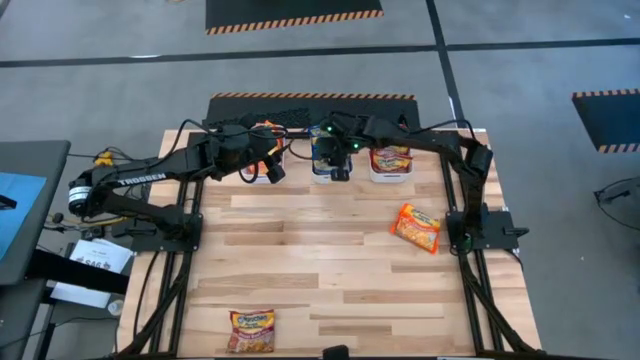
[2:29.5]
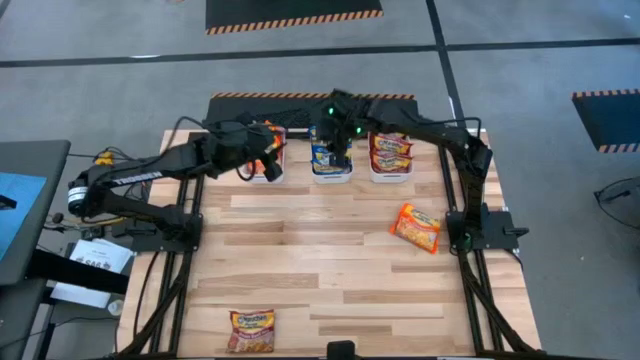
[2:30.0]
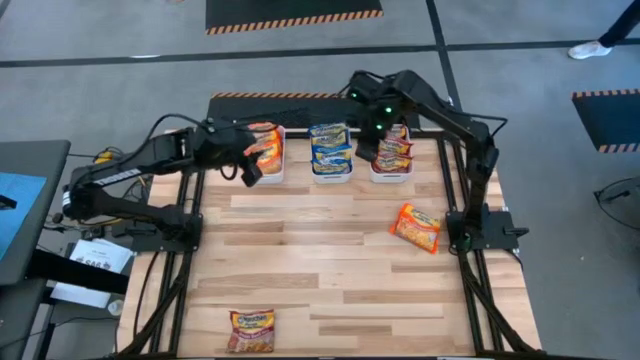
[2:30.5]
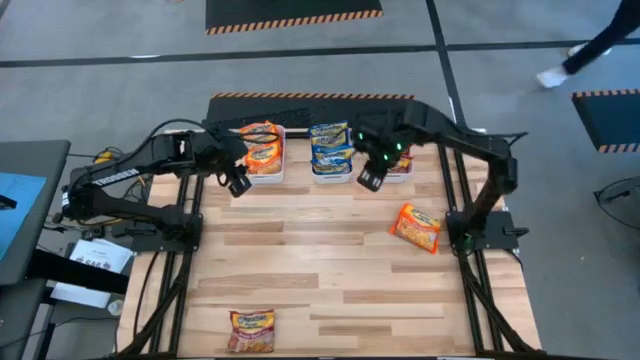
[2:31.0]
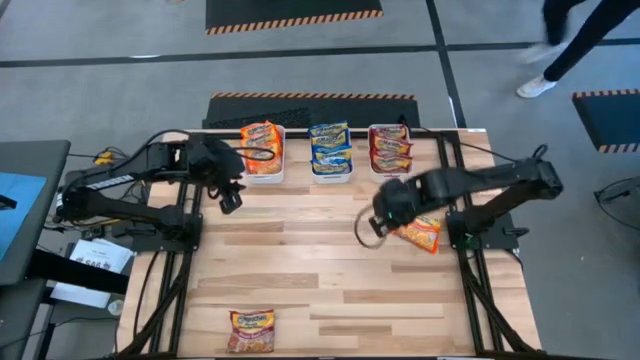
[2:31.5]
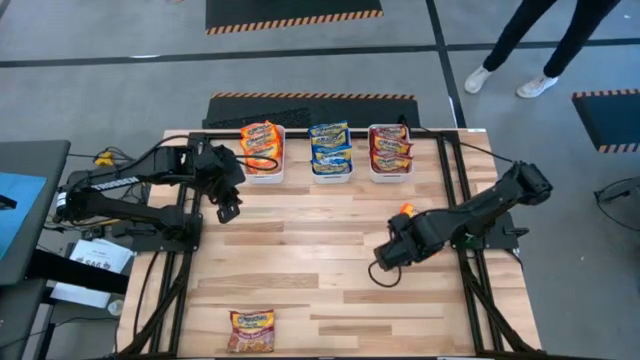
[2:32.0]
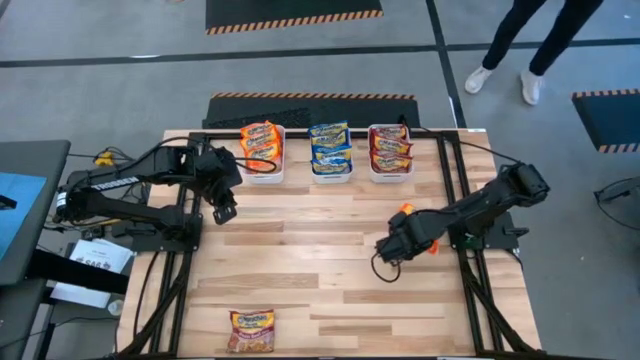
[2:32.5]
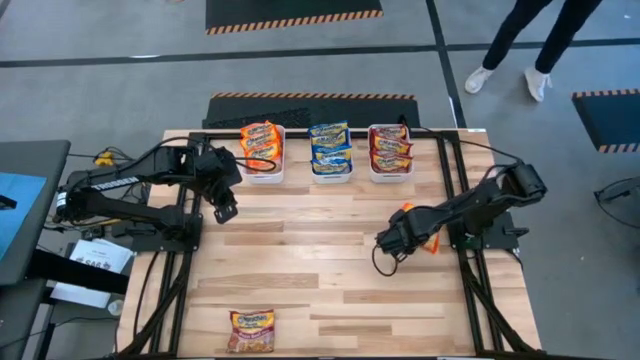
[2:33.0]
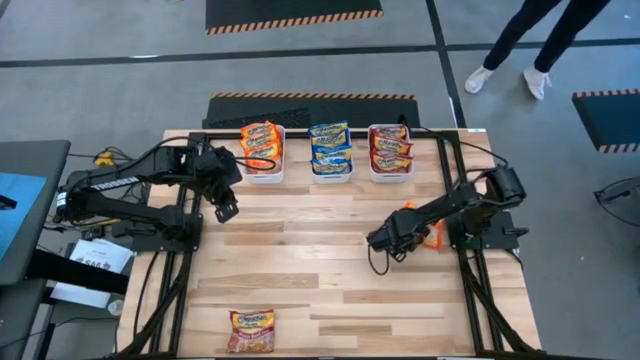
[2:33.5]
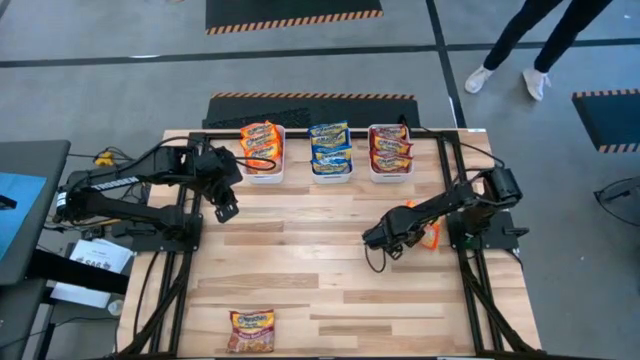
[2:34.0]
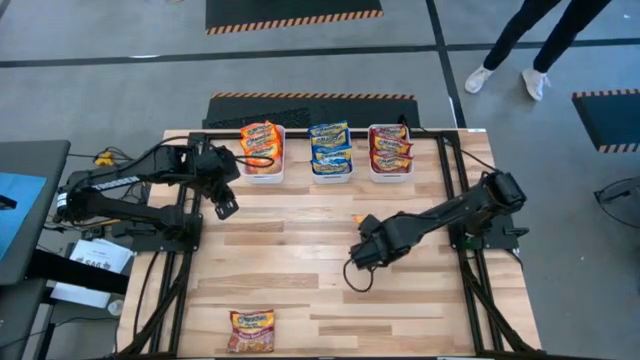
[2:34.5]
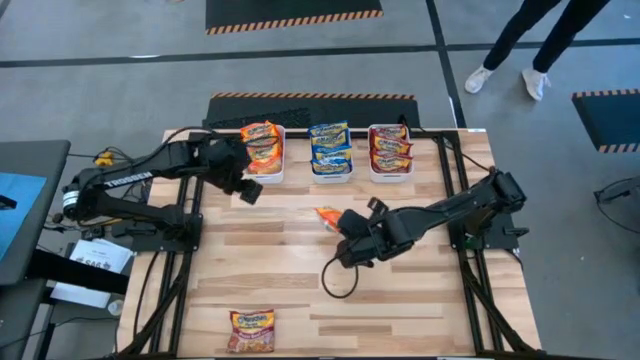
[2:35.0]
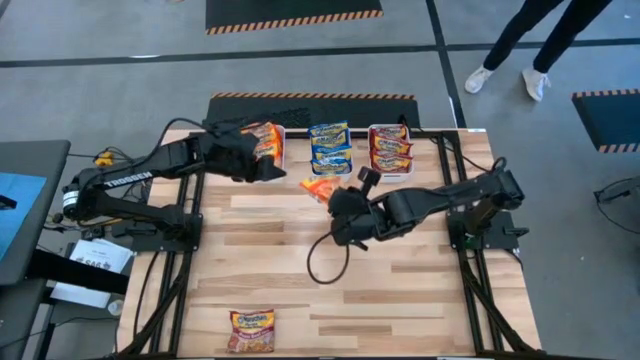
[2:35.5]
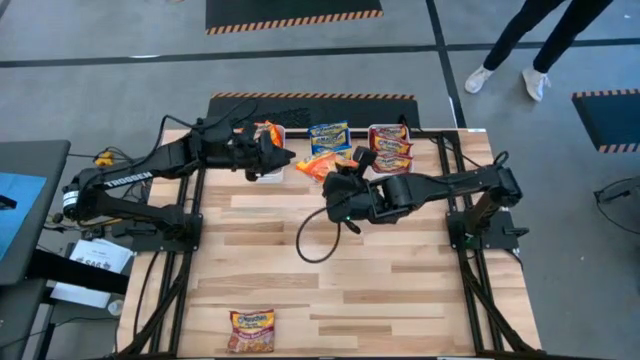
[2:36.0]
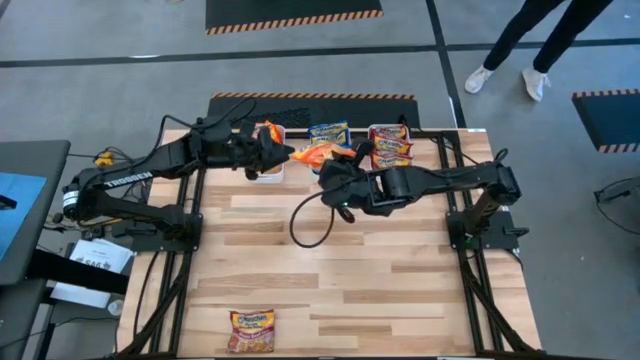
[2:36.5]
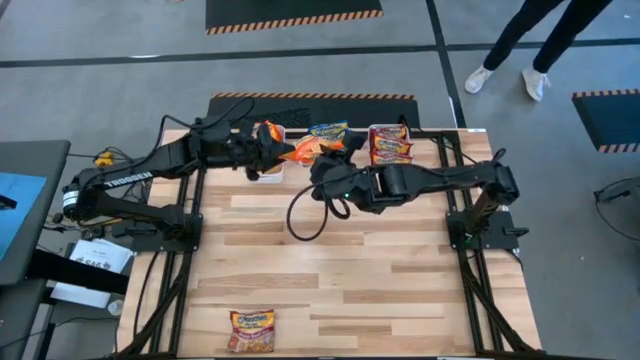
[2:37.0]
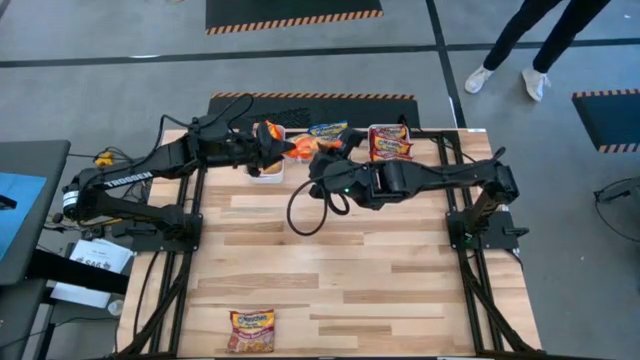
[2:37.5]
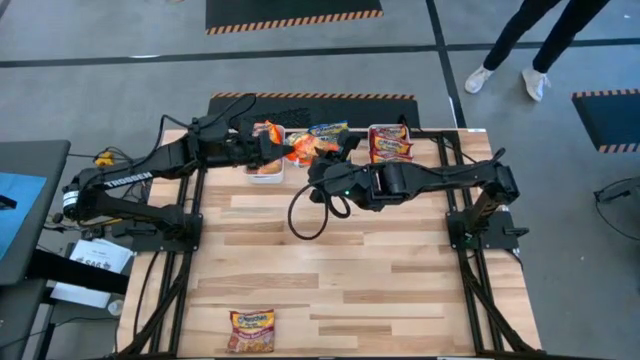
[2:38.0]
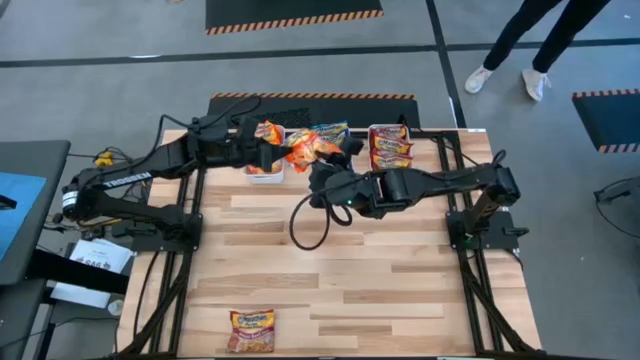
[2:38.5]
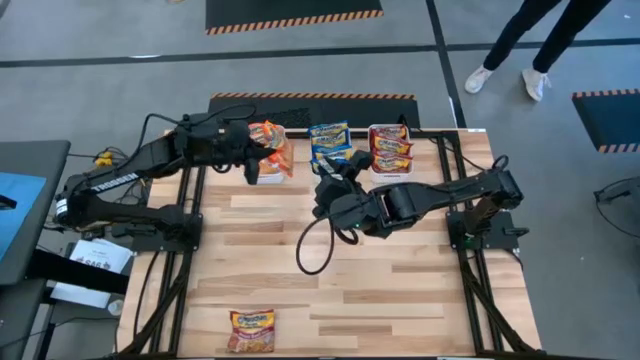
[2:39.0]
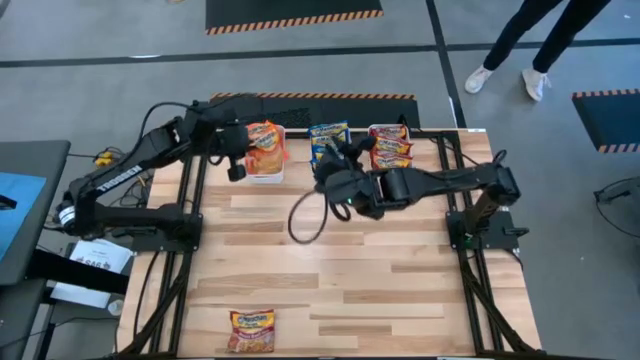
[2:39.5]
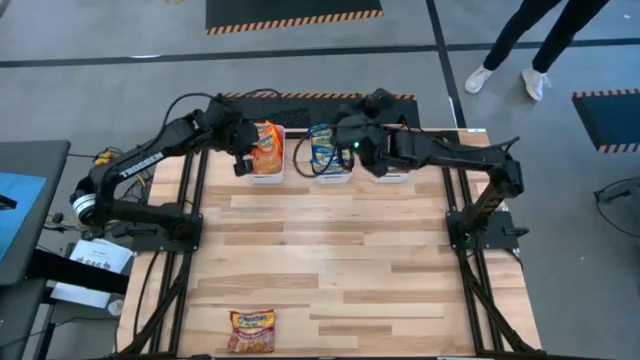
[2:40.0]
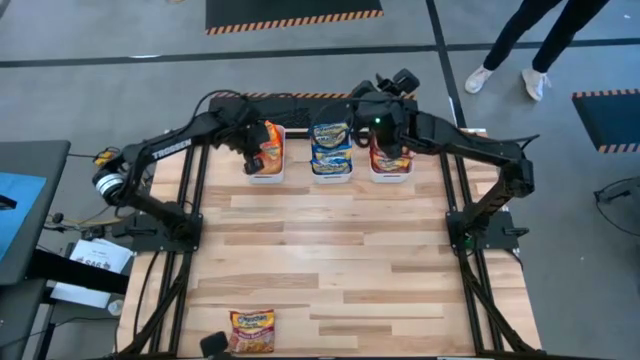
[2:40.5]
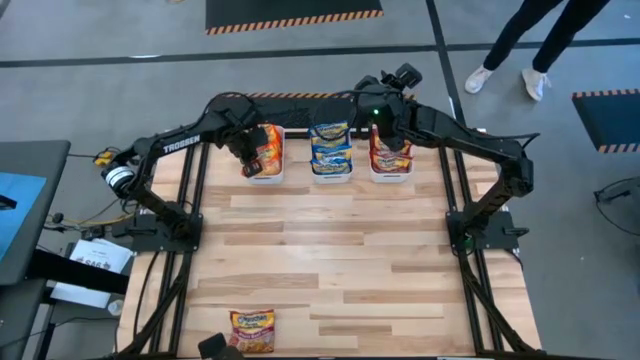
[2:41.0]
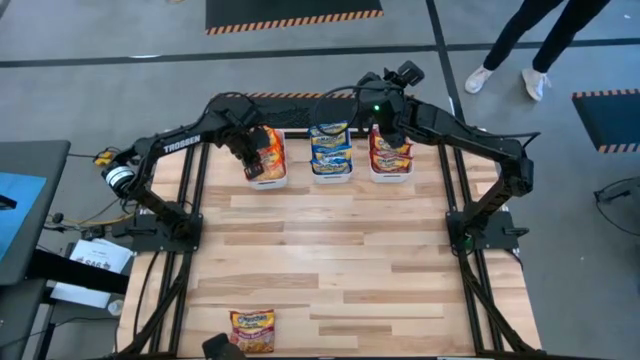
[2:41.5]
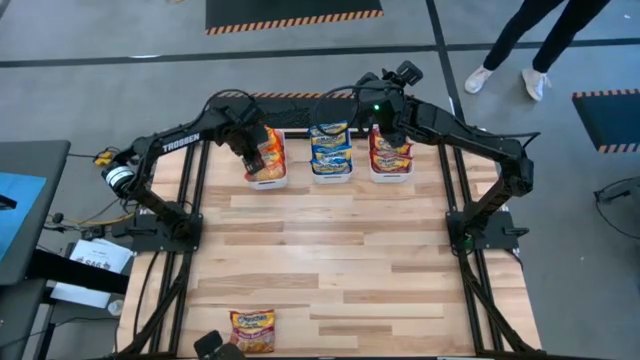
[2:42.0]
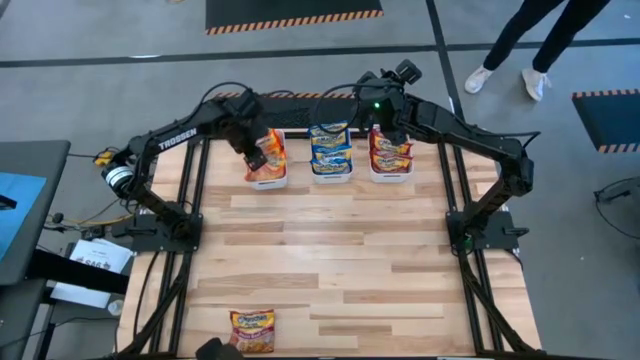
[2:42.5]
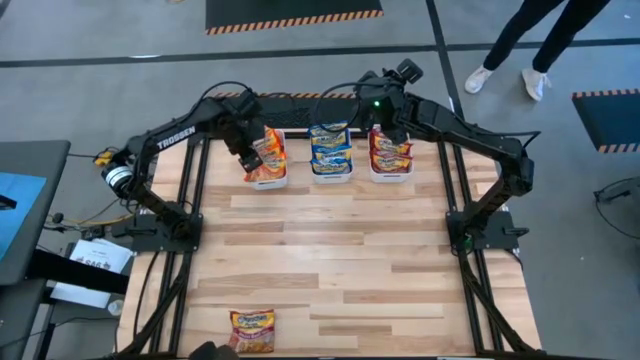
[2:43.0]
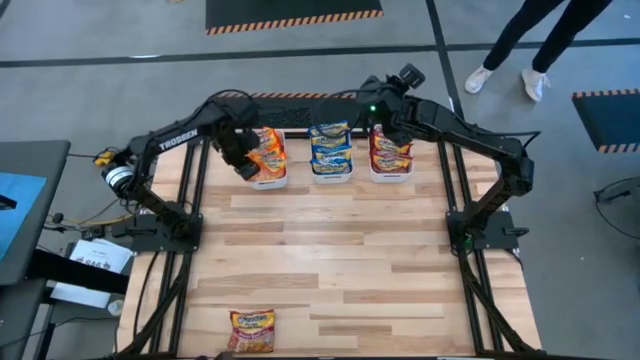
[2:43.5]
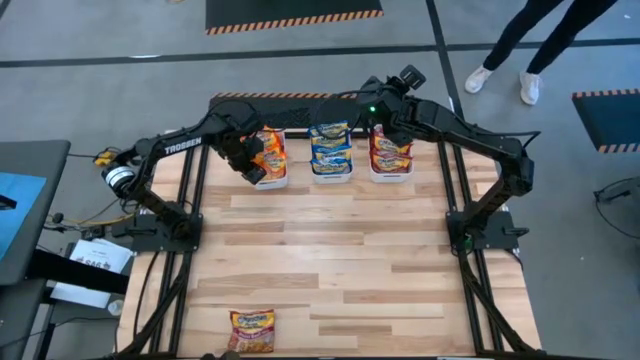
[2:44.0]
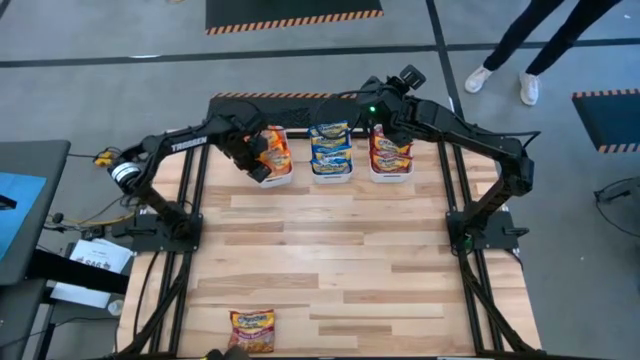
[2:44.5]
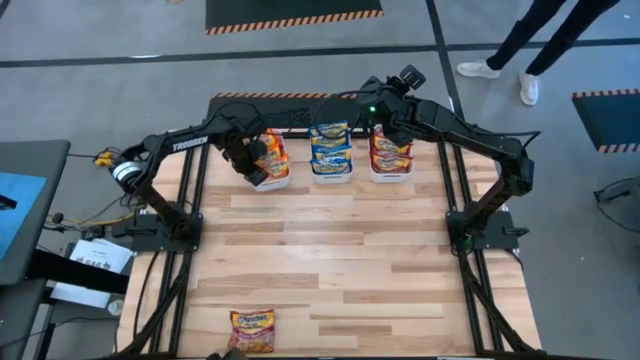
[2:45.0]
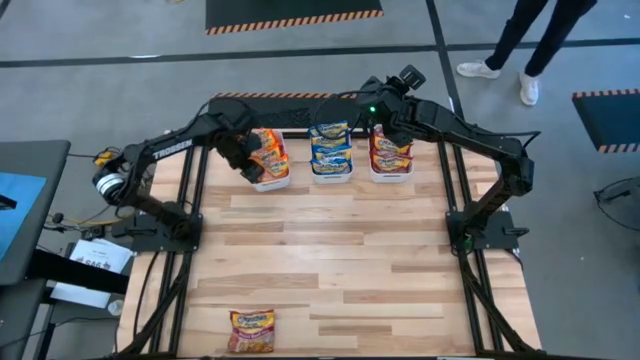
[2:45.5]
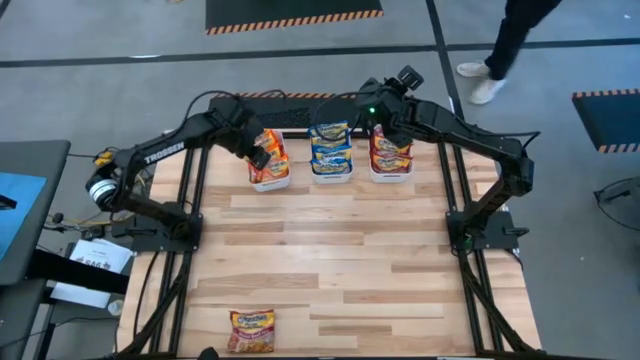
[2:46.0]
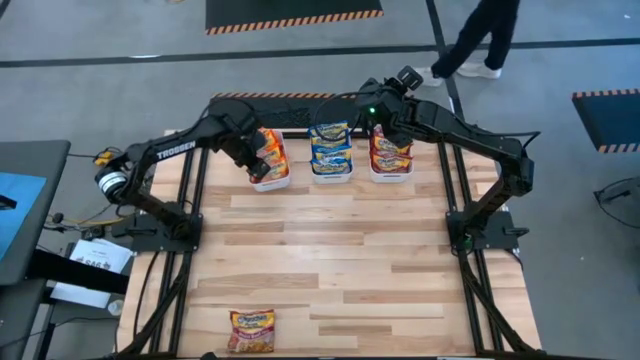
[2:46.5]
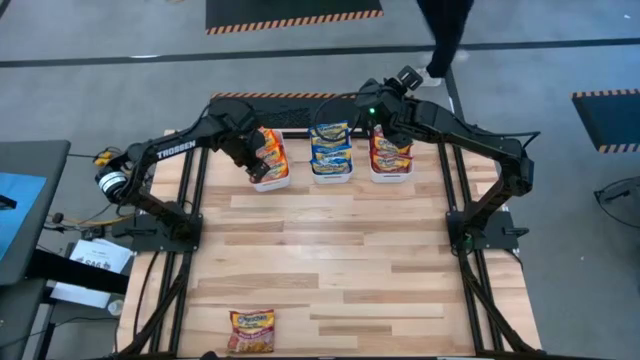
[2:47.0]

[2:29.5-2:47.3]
Task: Sort Maruchan noodles
Put the orange noodle pack into the left white bin

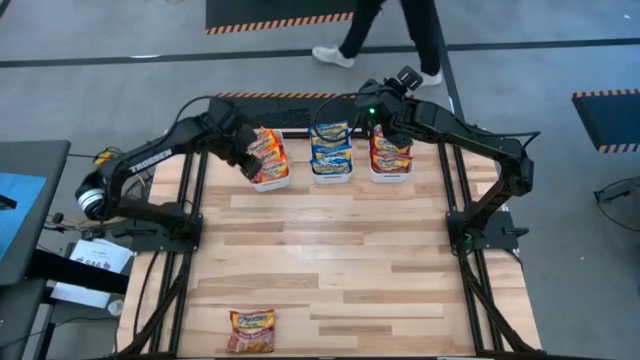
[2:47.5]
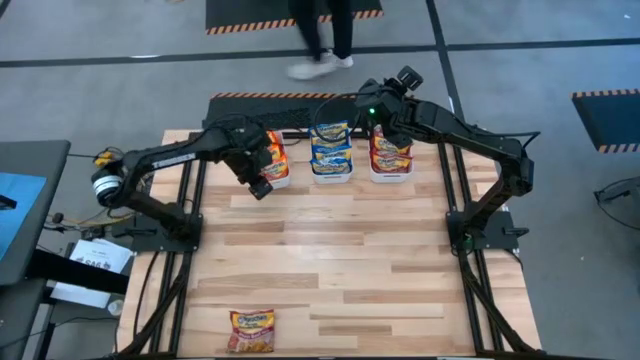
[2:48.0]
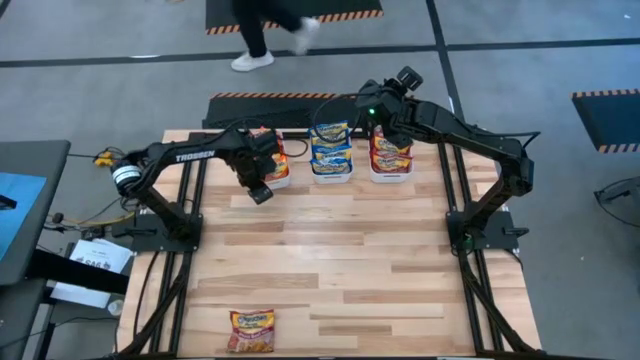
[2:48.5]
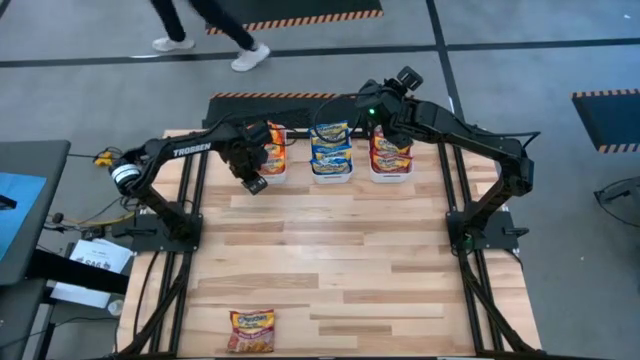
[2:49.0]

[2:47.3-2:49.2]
Adjust the left white bin

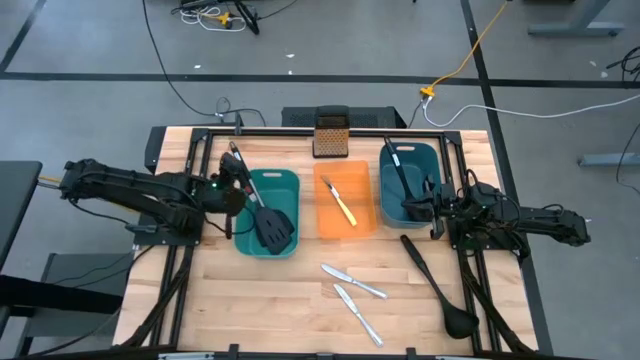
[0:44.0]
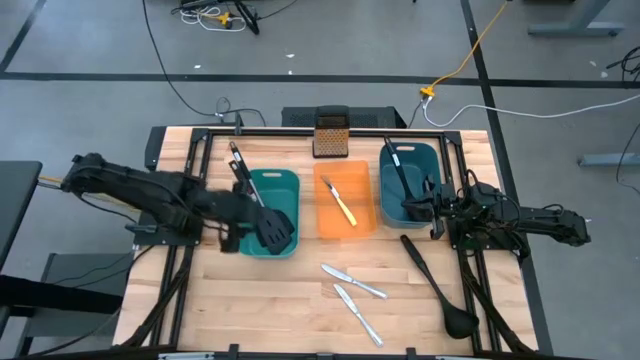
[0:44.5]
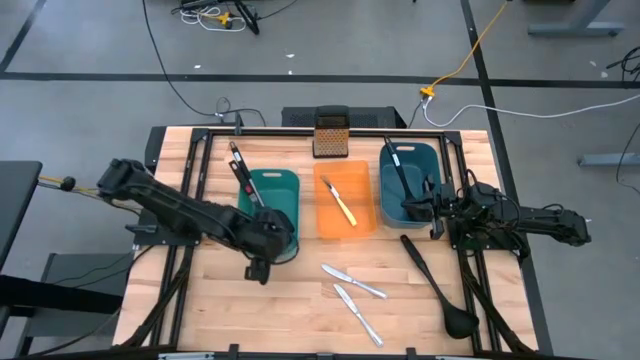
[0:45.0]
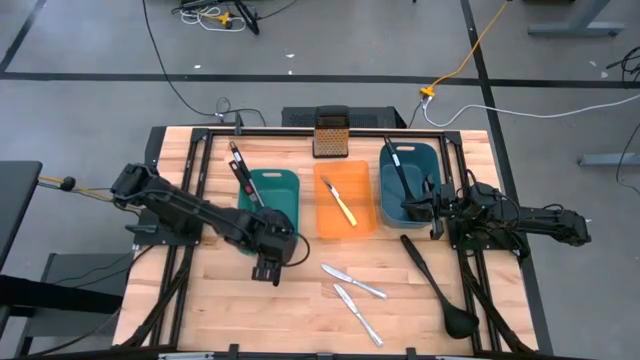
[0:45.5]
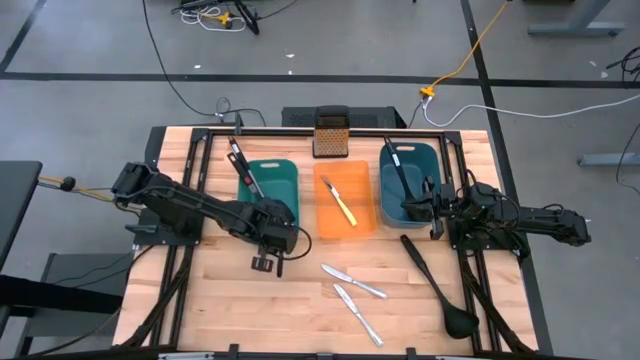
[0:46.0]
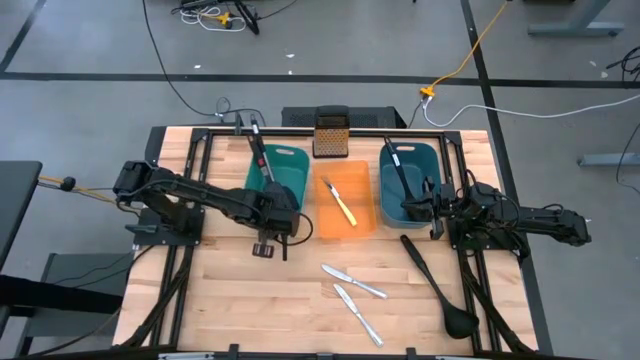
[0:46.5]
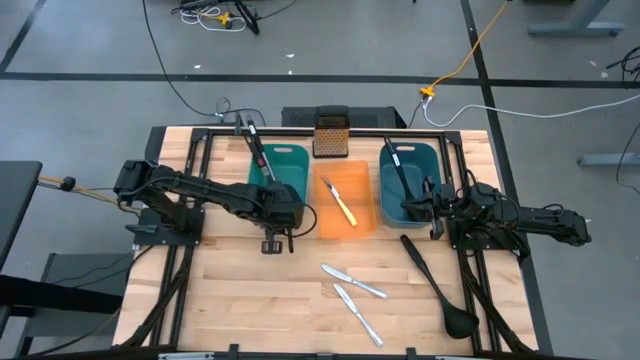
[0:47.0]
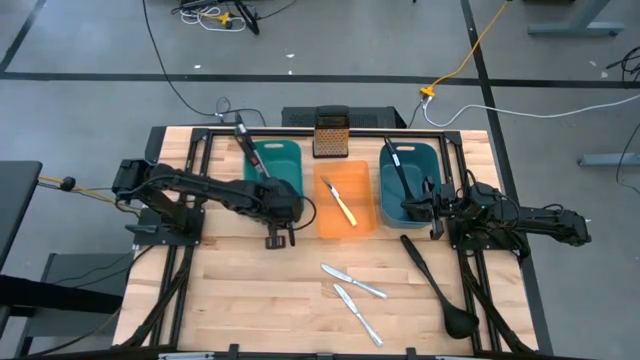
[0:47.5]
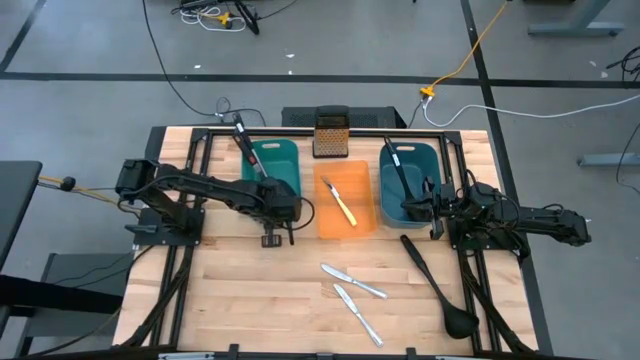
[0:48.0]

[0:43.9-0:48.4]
Task: Pick & Place Kitchen Items
Adjust the green bin
